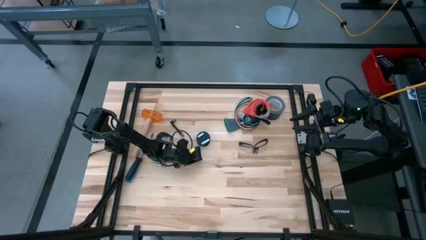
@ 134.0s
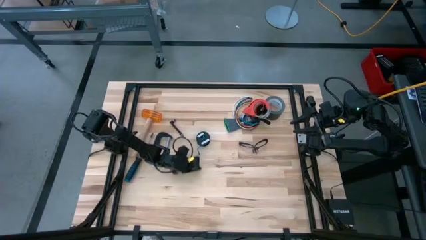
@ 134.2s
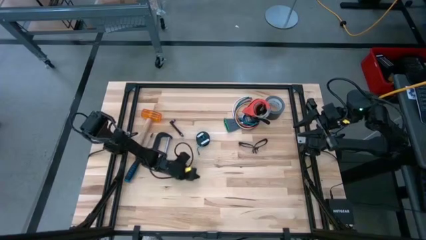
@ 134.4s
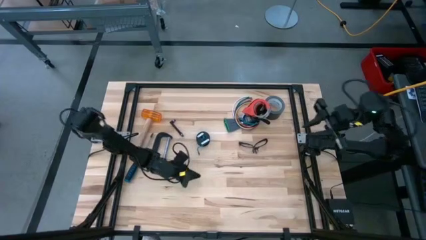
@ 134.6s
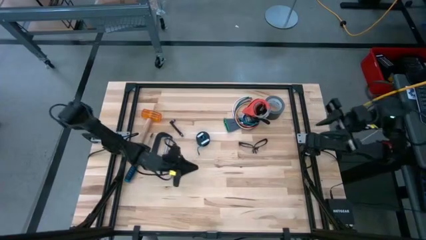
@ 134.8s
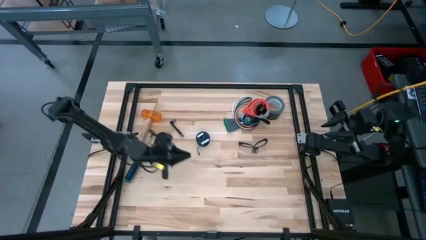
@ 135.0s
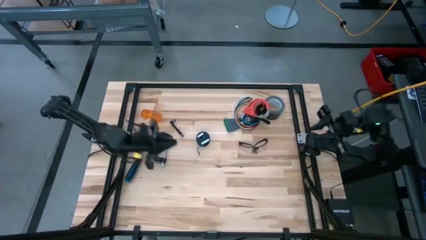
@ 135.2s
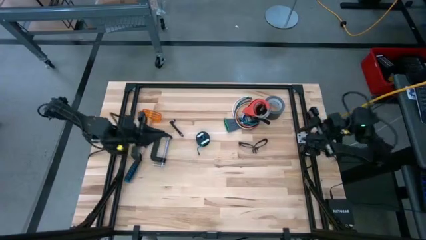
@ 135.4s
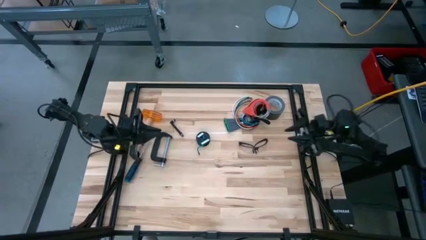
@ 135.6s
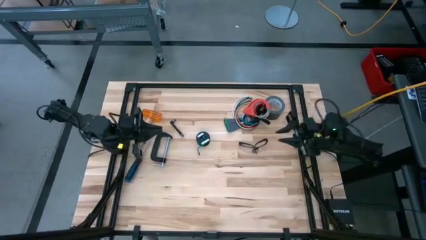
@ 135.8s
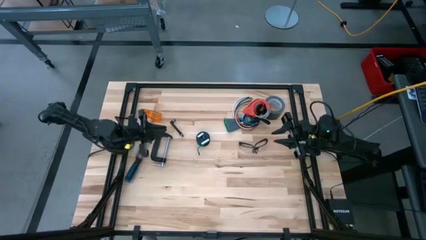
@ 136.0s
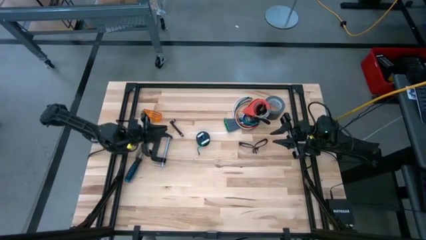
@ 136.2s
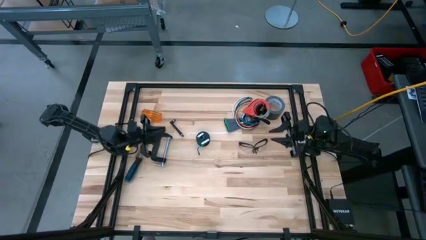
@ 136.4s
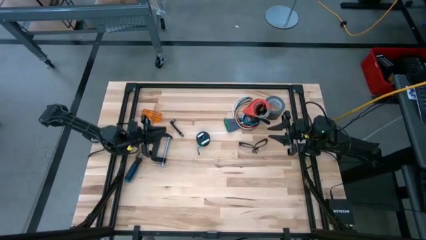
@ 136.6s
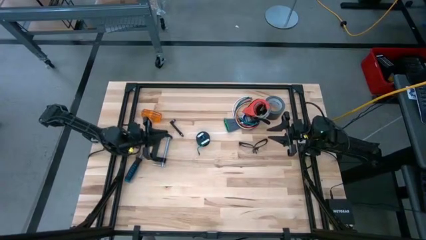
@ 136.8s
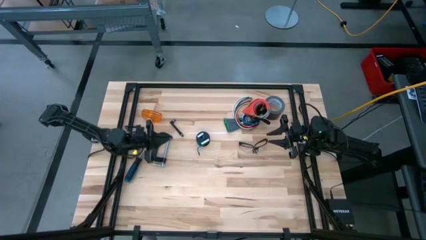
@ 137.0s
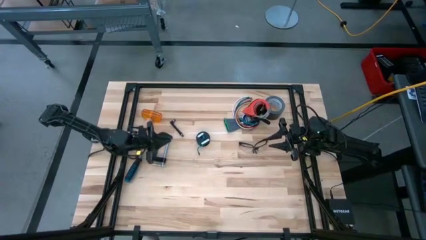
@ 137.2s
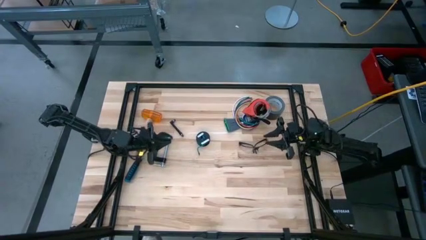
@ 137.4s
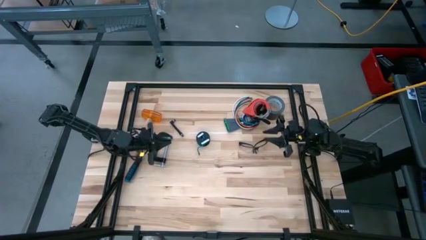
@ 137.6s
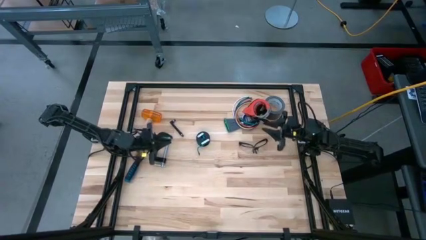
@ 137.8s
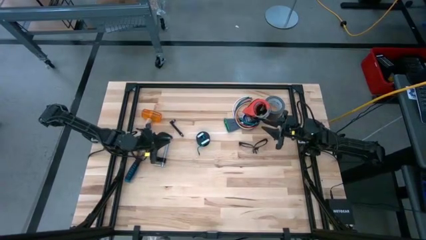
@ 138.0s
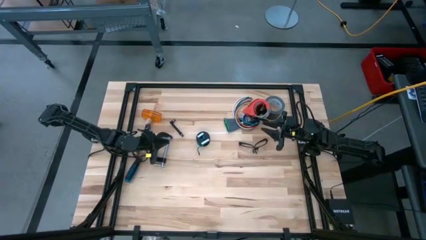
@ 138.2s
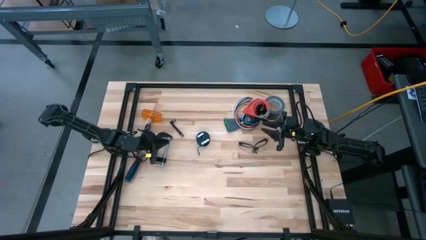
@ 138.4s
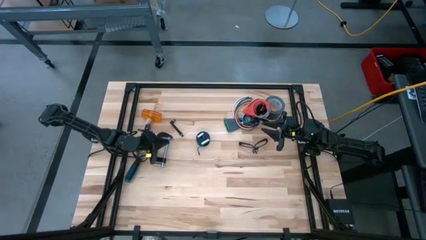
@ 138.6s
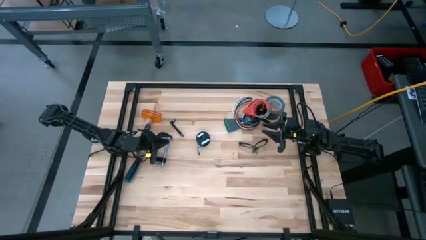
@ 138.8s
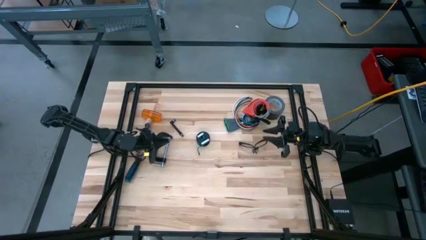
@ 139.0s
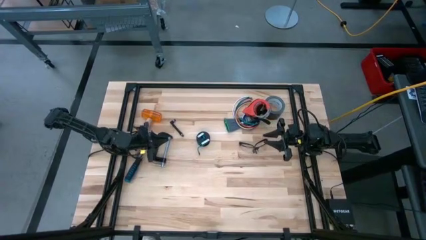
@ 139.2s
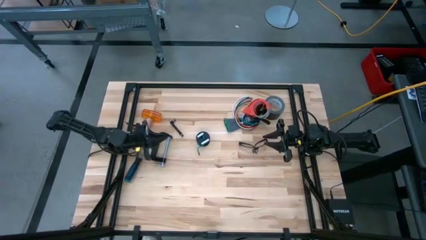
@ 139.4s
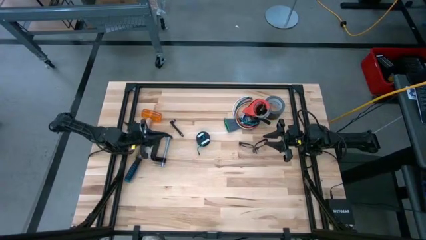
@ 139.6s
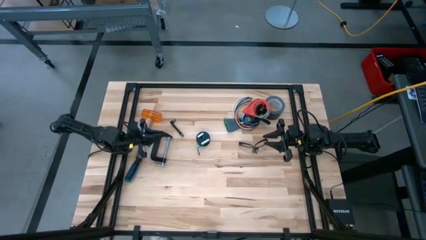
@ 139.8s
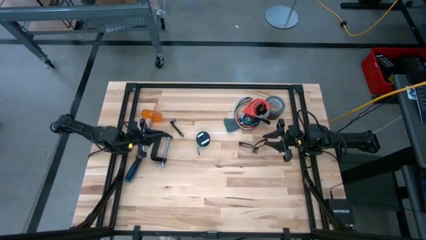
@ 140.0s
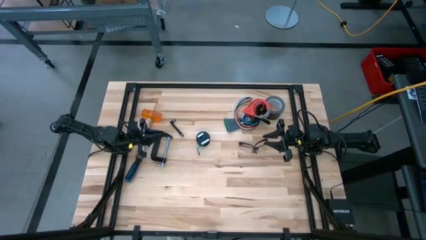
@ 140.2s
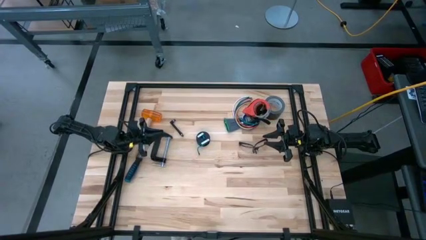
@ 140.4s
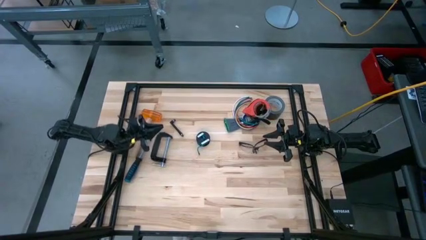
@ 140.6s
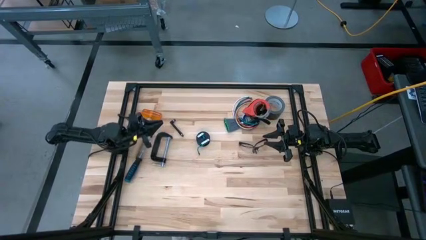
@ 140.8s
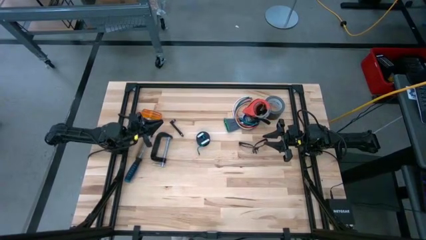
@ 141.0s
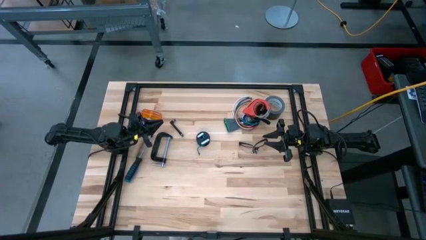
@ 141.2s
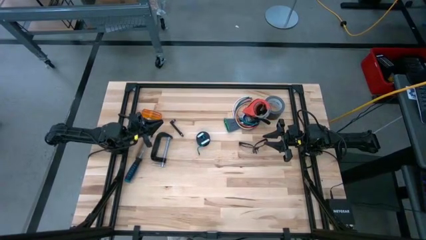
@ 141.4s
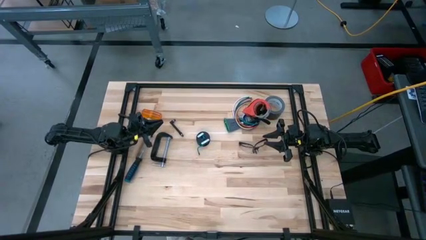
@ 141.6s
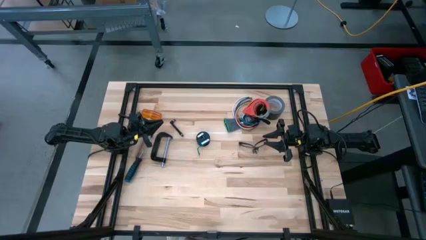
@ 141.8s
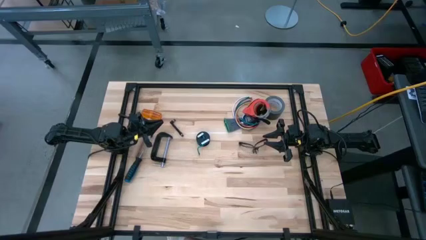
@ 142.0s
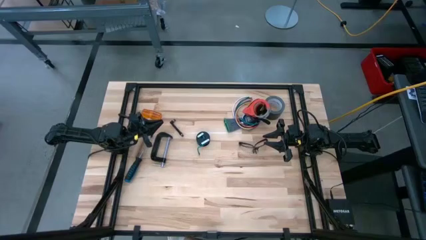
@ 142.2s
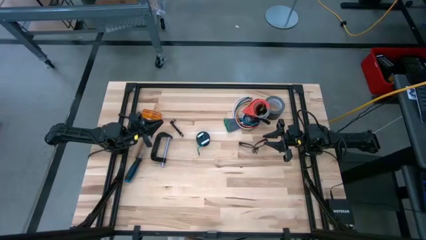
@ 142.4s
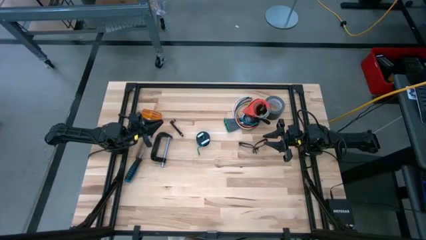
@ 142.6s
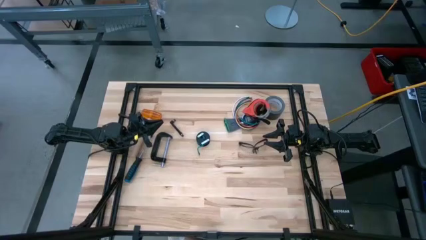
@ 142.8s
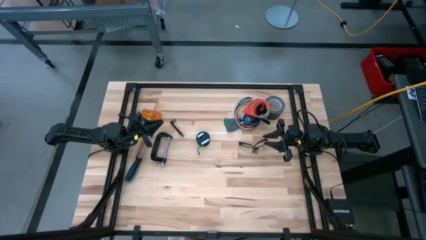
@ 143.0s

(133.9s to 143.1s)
Task: Coil cords
Return to Home Position

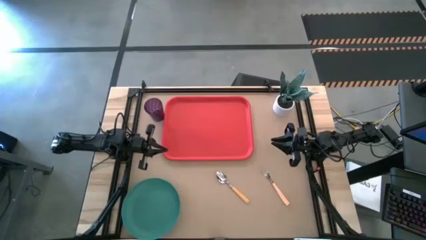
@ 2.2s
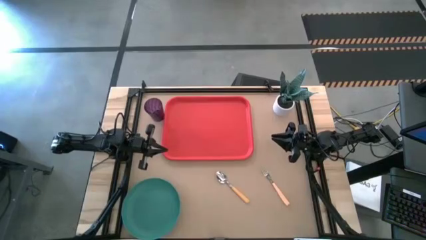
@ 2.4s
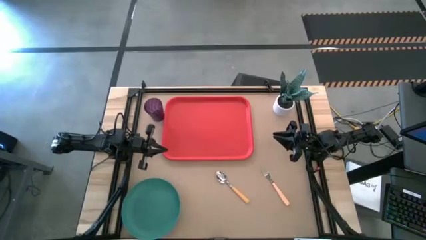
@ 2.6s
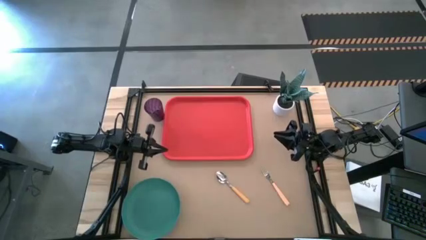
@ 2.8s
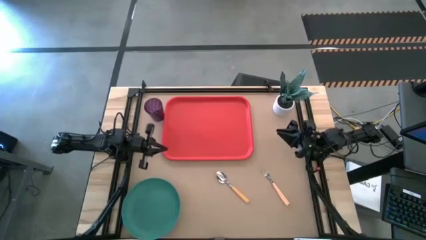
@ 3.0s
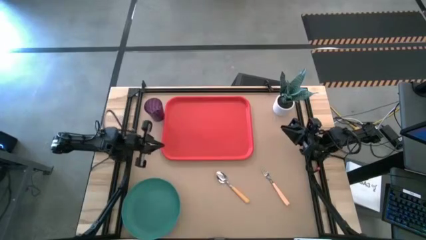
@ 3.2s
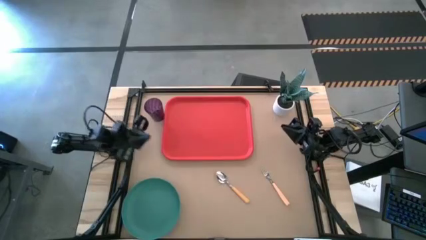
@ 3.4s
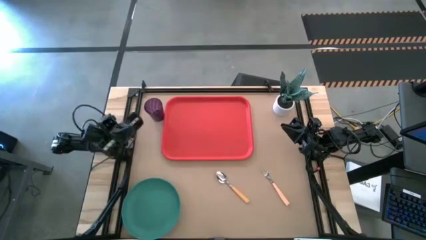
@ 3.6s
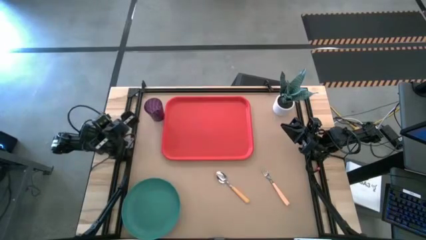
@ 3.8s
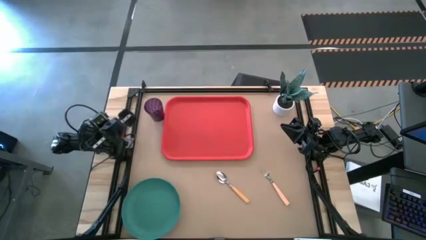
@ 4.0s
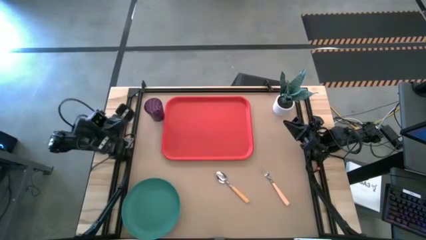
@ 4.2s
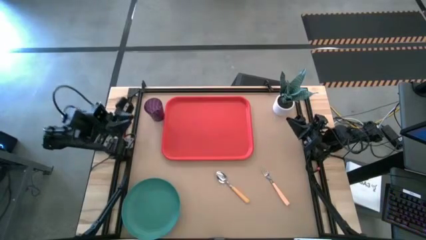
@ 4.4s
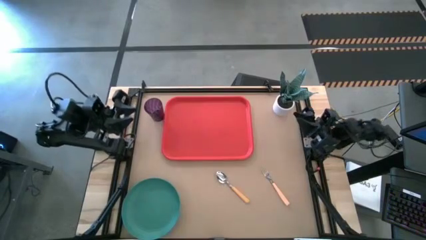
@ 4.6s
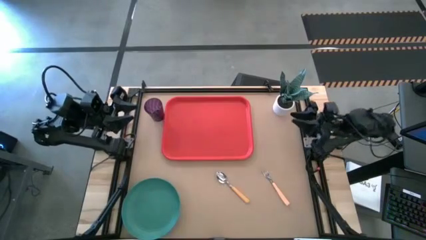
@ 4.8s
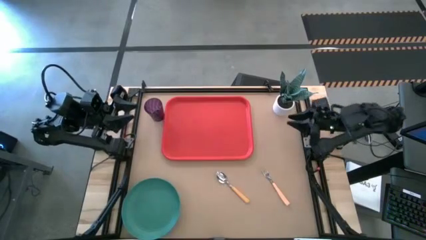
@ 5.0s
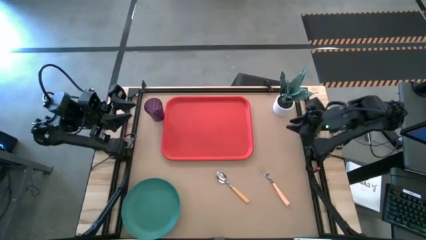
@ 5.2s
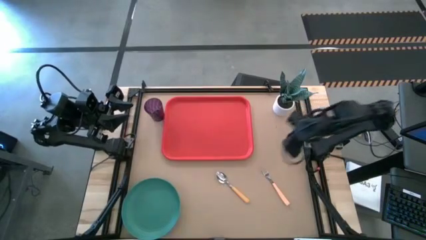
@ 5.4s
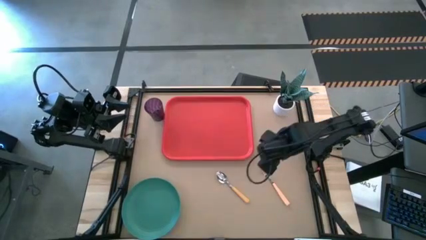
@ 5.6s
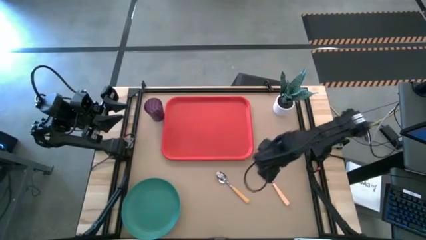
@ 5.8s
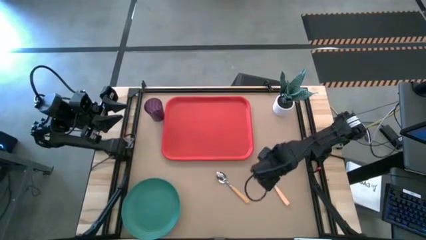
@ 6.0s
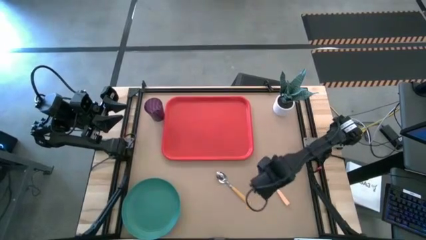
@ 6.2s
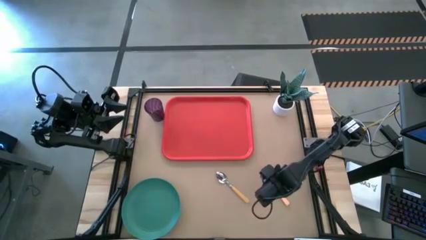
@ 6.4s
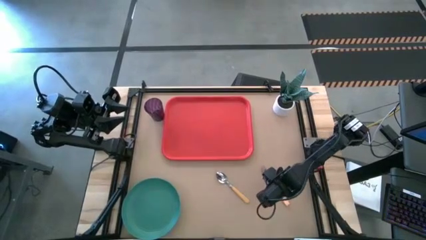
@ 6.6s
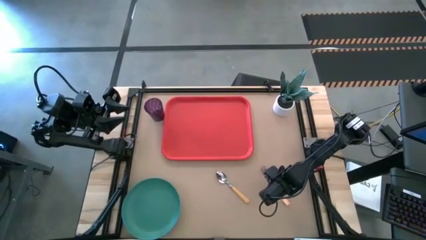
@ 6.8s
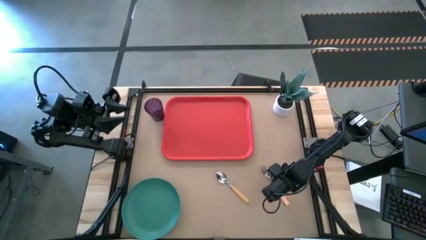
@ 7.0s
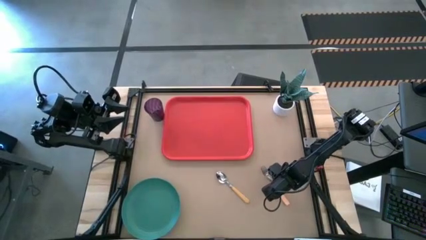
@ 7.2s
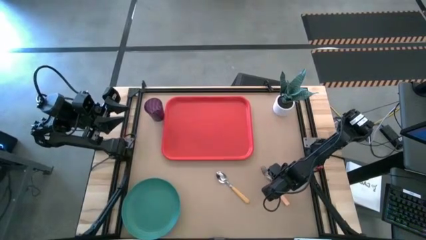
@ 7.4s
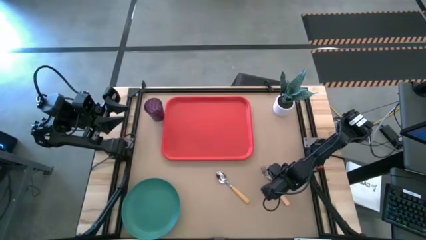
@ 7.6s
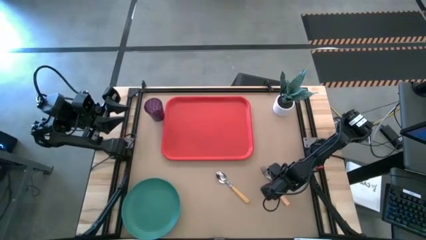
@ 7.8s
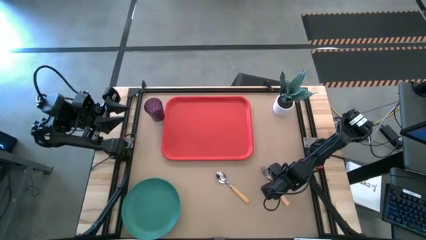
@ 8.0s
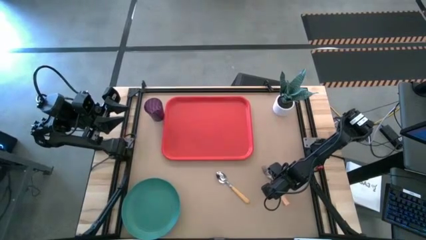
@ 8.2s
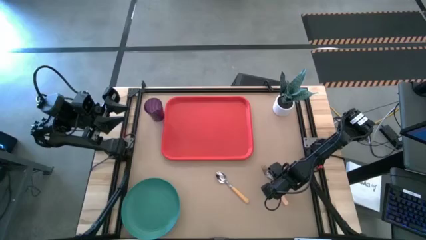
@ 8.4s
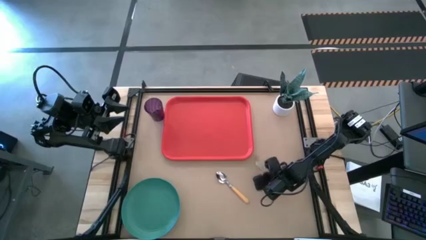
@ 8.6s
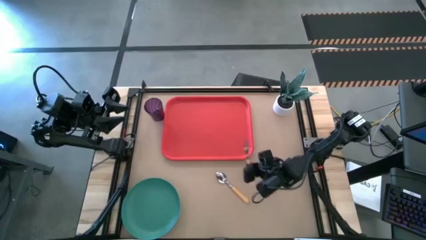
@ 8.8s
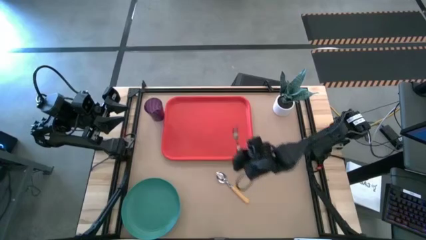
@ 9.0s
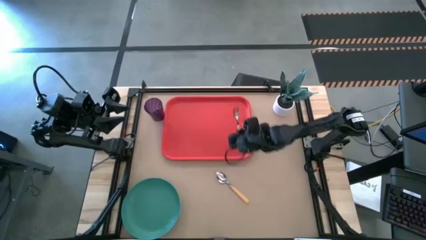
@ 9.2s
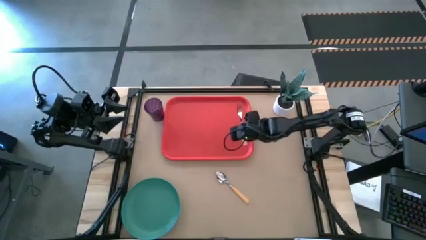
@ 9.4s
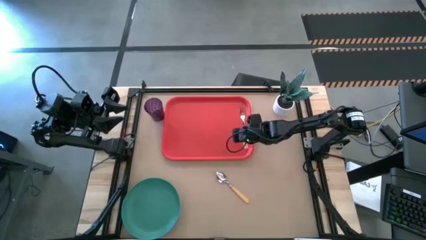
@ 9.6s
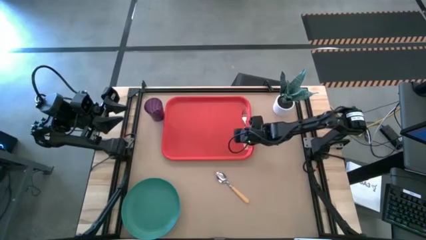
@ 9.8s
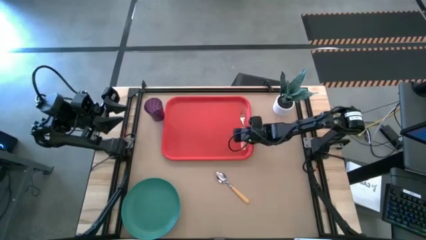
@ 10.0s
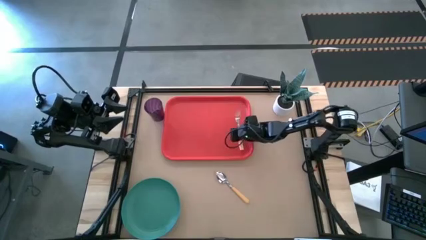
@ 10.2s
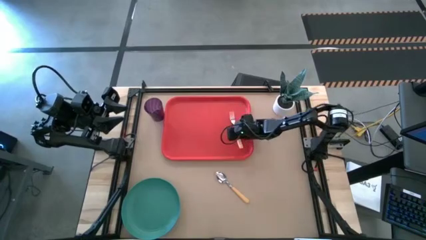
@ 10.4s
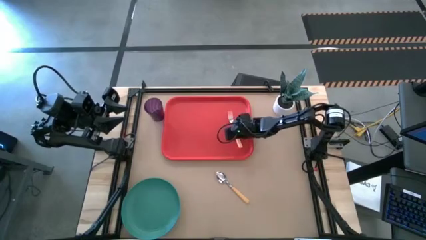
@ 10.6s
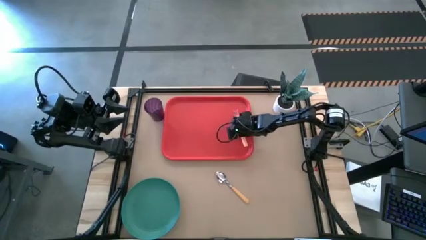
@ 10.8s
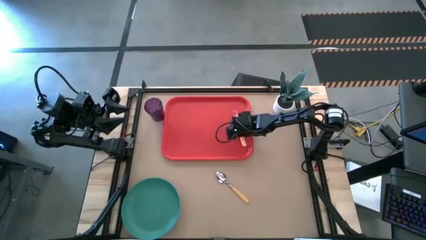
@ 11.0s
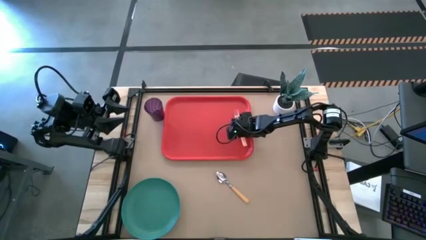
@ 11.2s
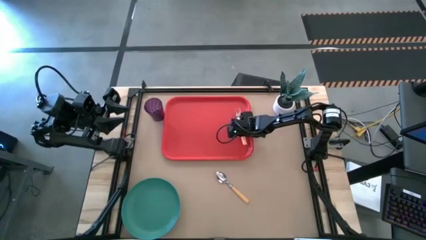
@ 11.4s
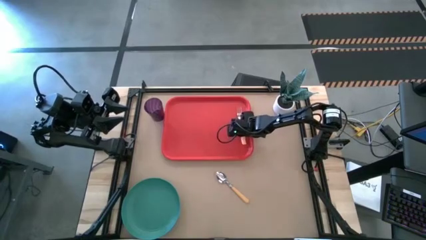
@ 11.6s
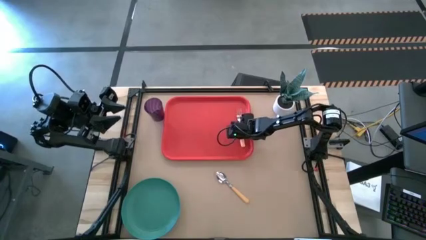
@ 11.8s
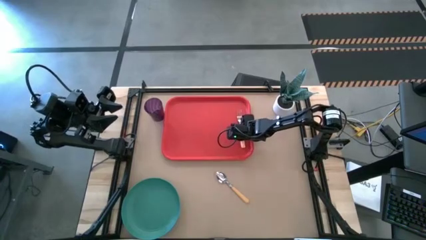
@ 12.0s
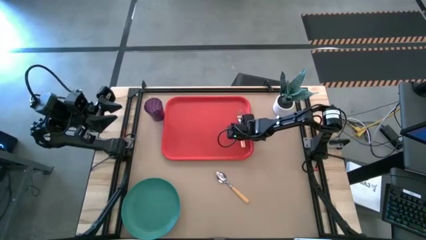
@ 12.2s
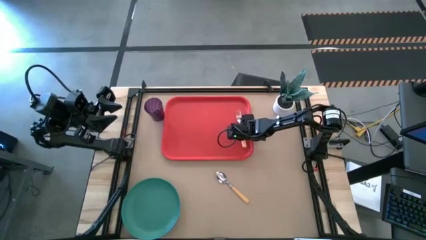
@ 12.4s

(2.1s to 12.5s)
Task: Pick and place plate/cup/fork/spoon on tray
Put the yellow fork on the red tray
